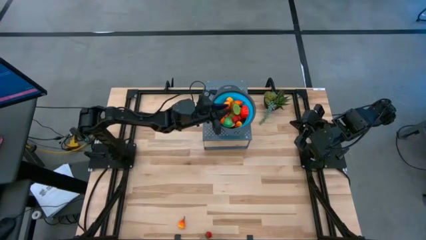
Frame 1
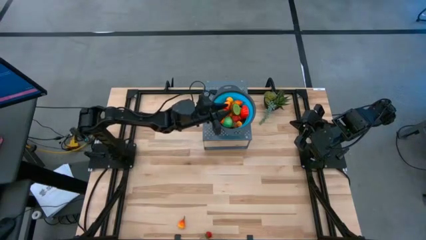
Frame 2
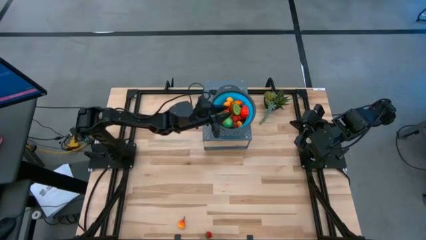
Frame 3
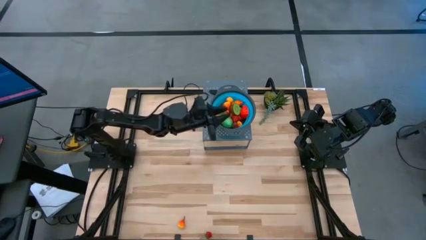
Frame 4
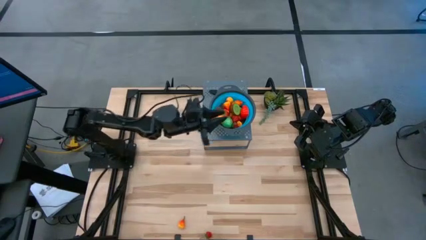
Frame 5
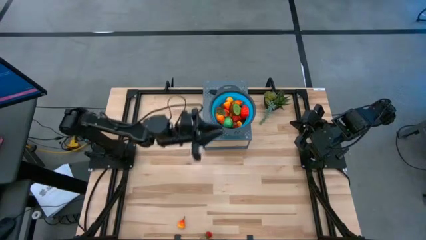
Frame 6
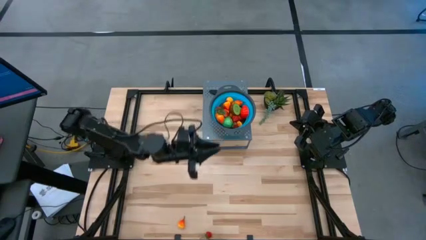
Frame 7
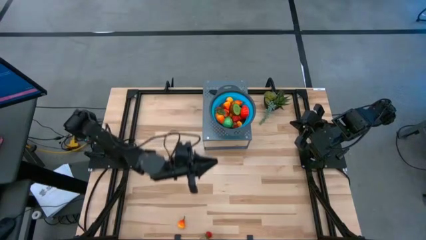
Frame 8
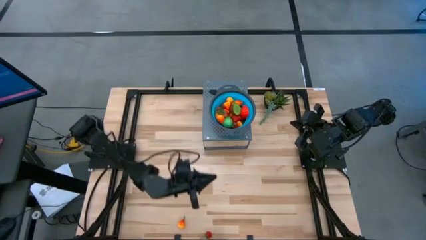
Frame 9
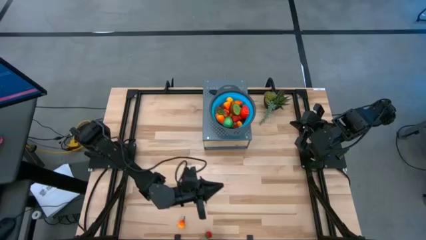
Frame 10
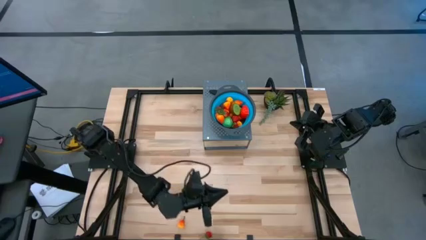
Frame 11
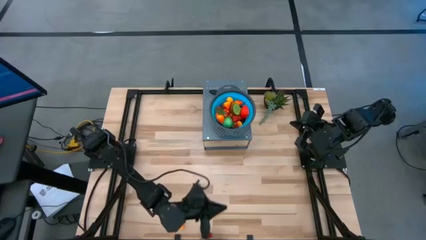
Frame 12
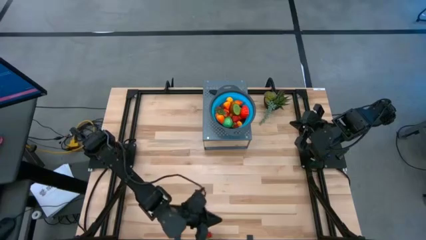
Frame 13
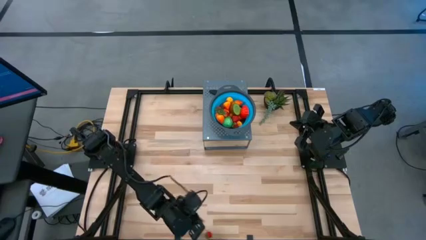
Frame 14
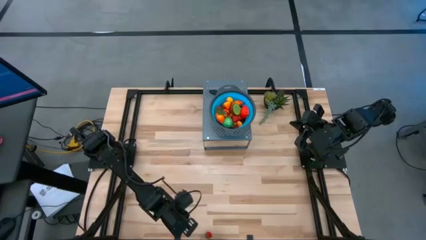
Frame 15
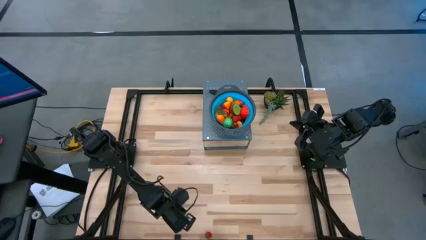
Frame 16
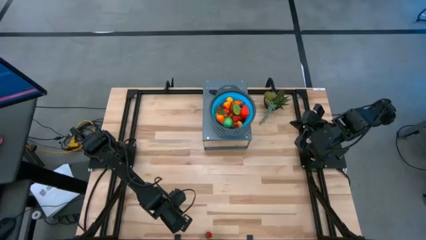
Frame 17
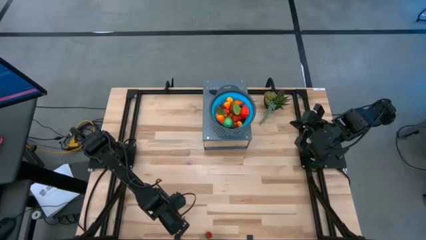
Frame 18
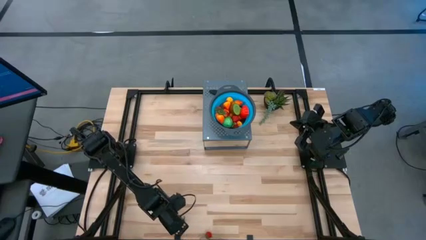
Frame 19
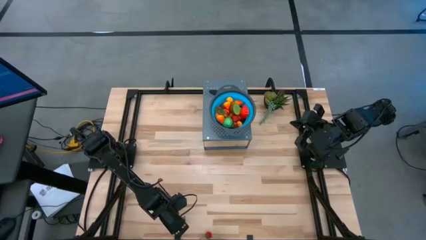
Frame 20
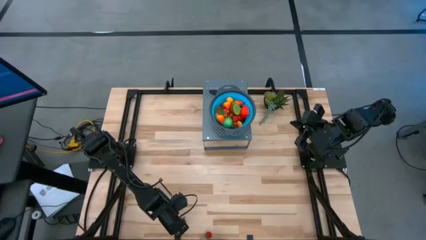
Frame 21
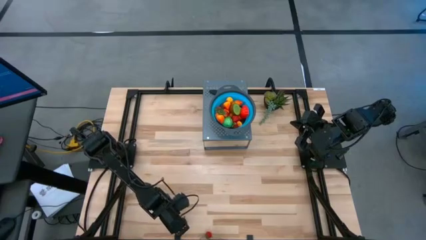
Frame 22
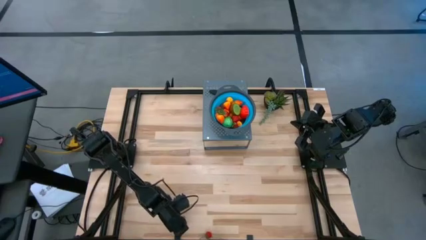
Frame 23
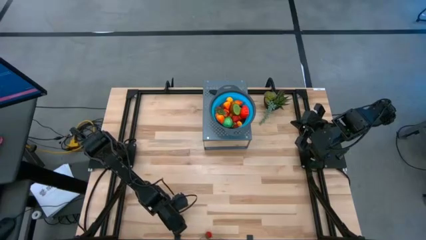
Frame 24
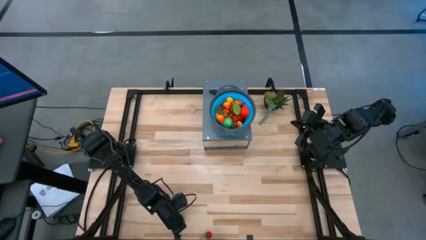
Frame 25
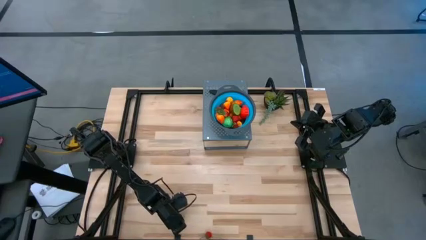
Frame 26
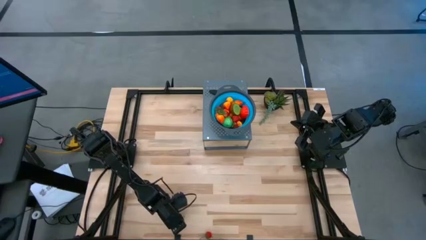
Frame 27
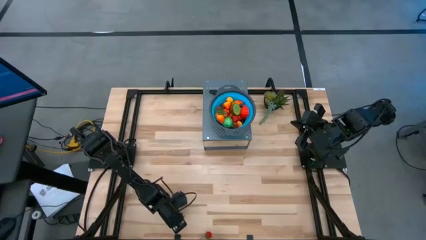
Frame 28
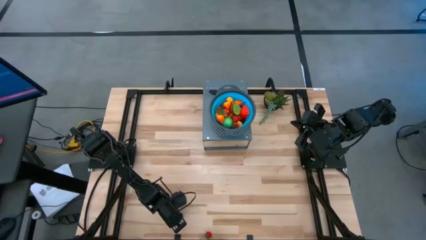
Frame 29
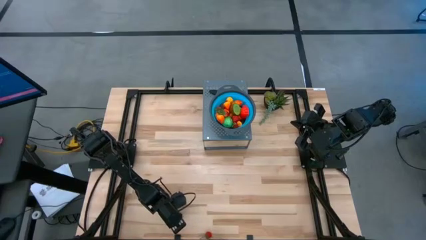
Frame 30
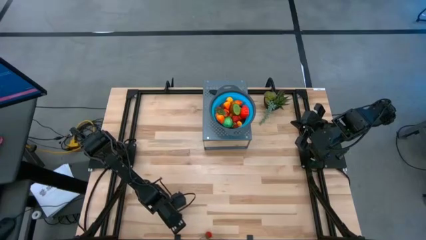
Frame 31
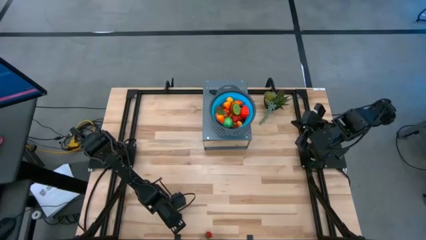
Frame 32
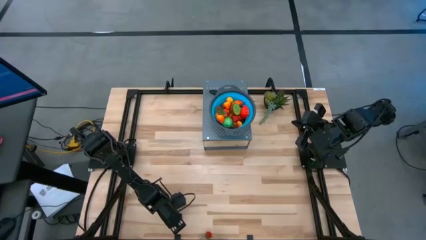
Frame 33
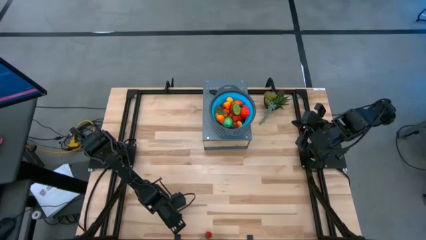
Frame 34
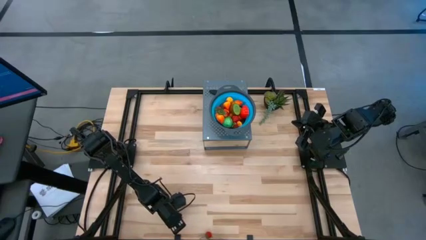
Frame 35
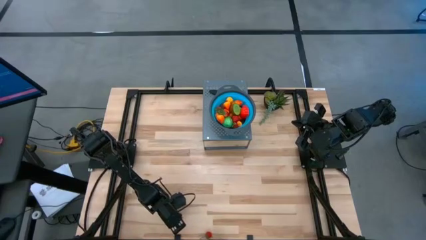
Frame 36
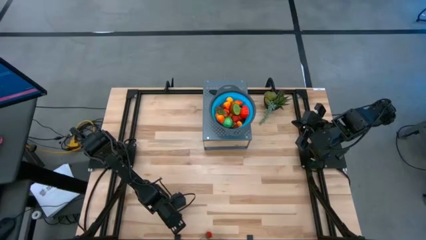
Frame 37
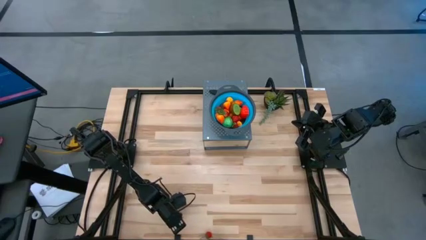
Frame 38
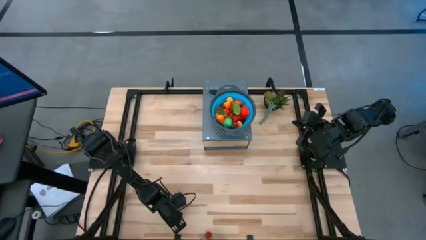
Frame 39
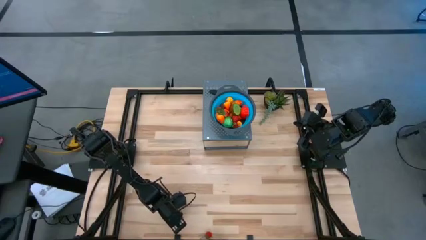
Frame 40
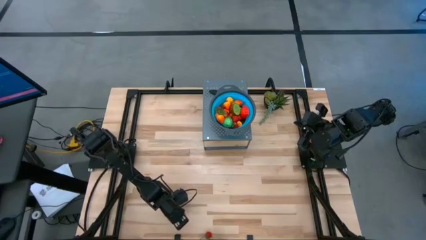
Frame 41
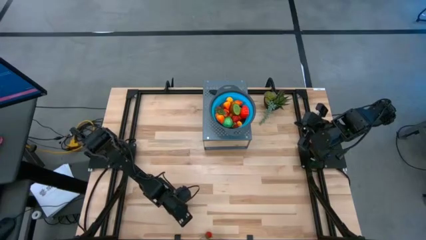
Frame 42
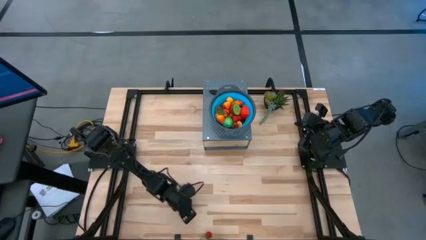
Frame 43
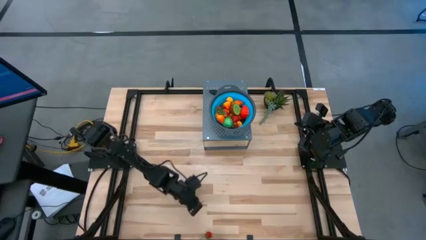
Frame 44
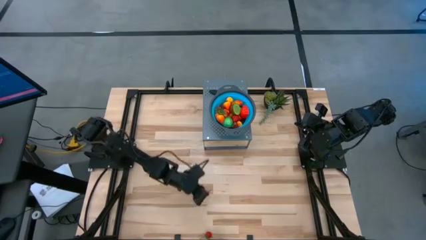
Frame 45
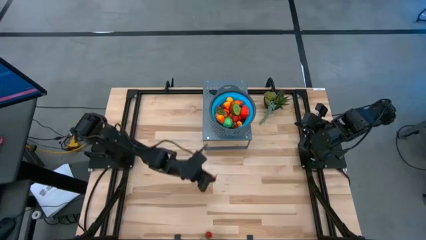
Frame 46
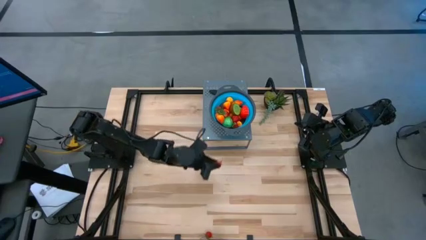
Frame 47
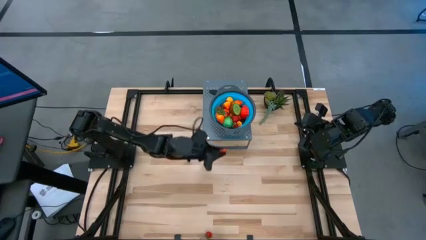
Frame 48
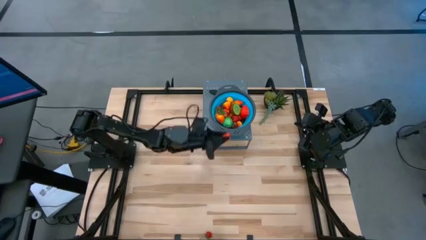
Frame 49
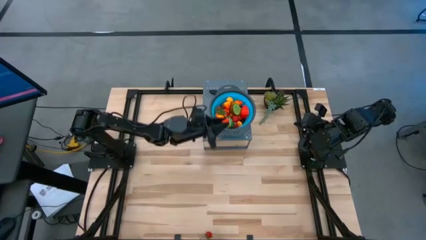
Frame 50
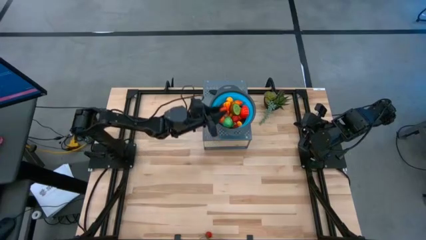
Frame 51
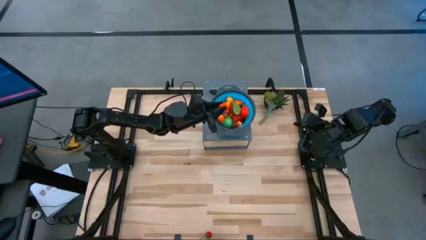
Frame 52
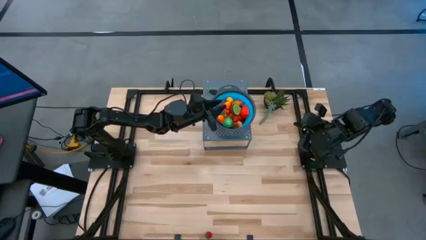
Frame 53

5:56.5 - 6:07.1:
Task: Pick & Place Fruit
Put the peach into the strainer bowl
